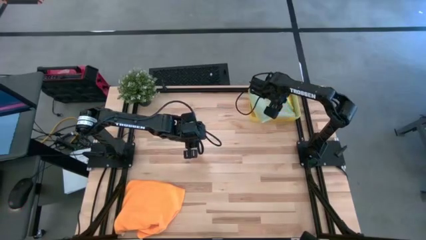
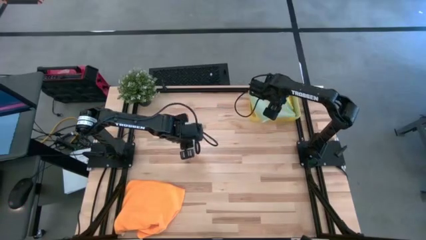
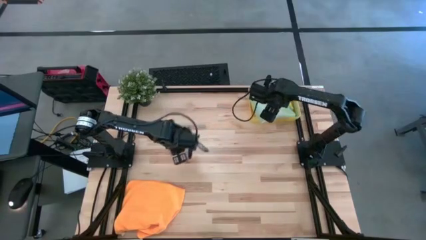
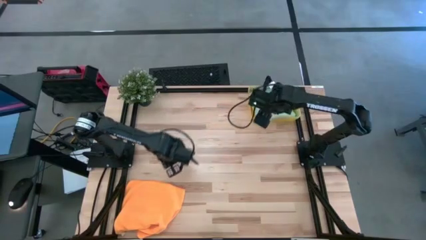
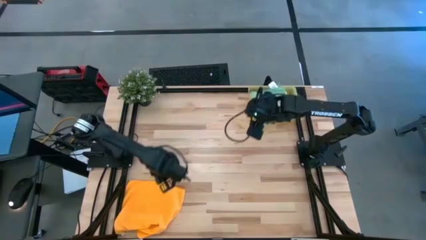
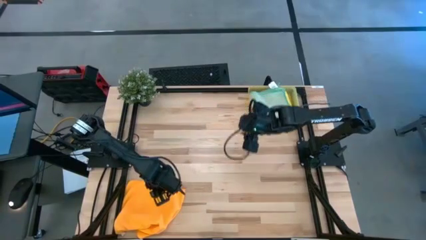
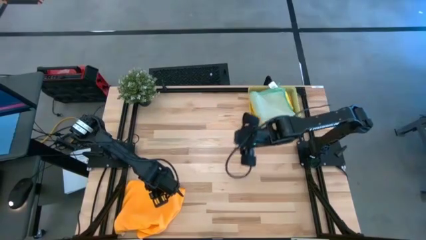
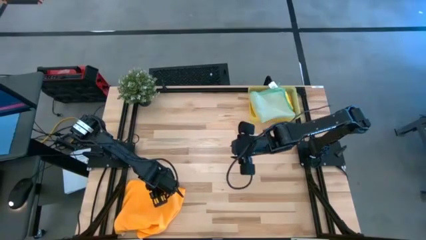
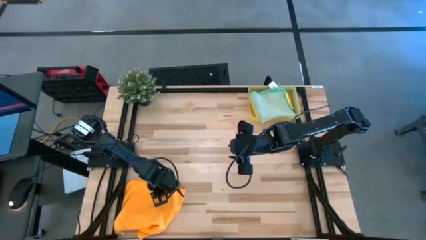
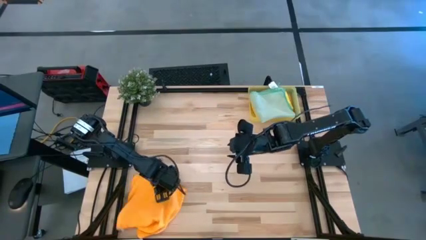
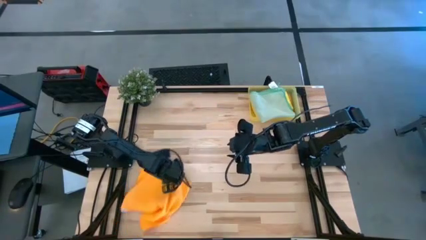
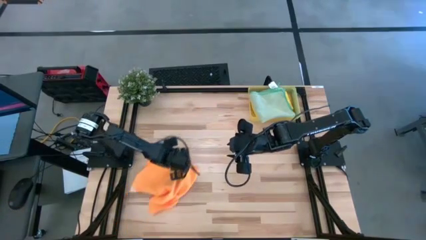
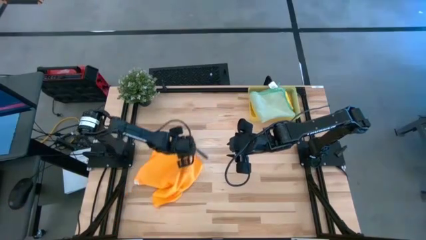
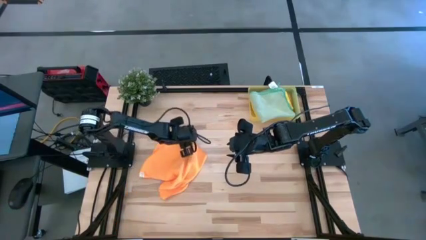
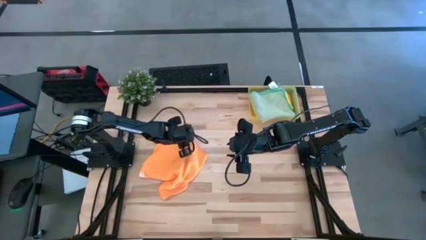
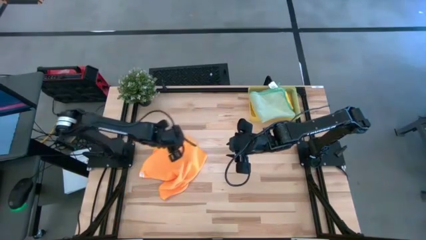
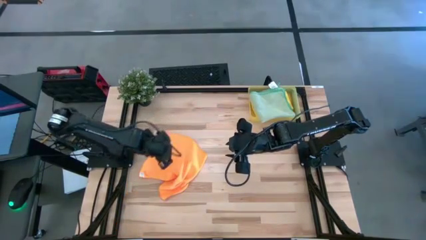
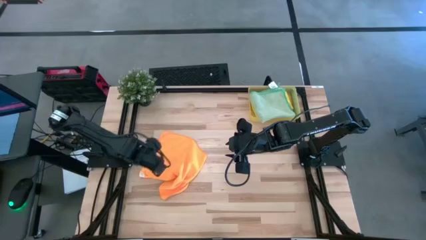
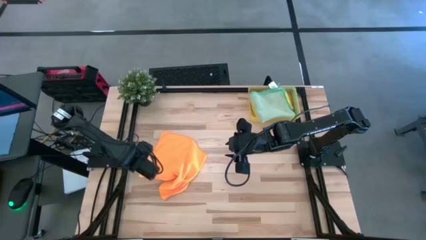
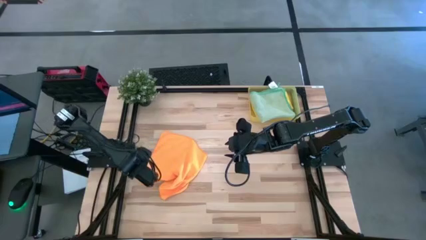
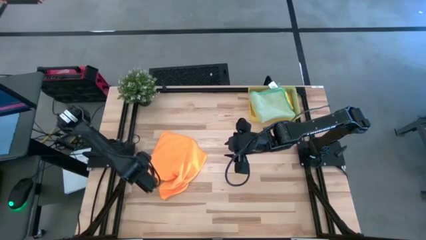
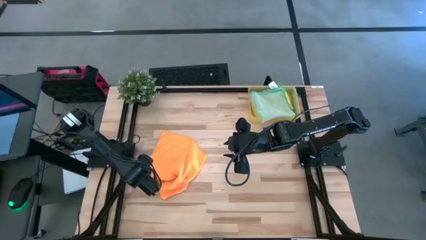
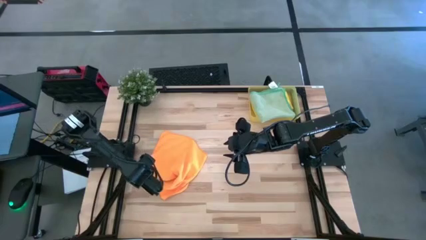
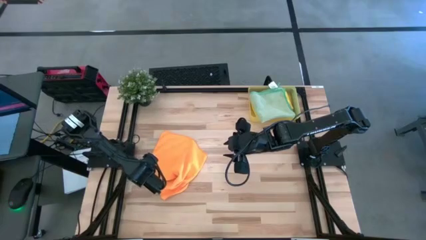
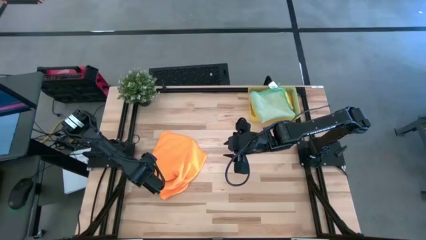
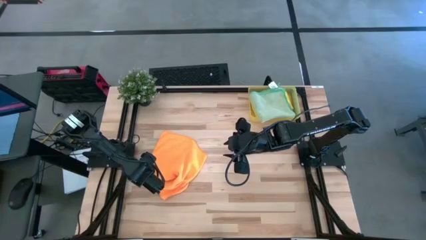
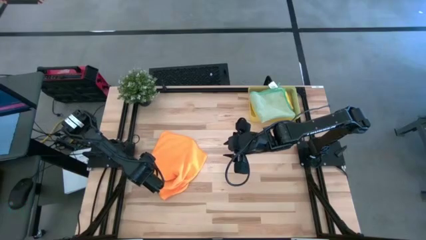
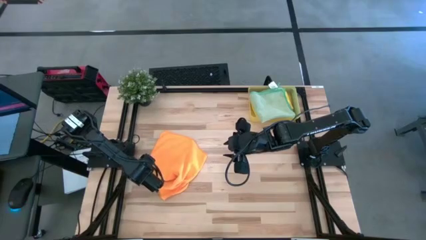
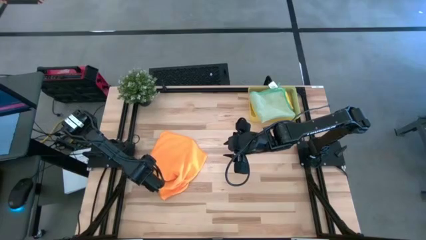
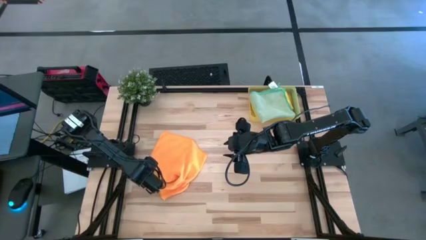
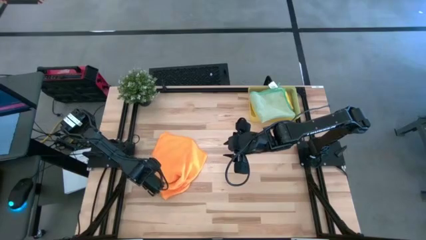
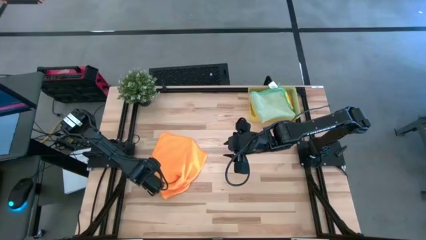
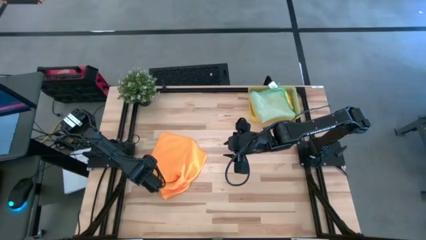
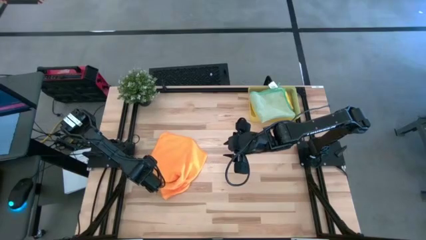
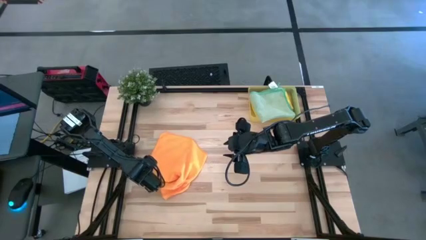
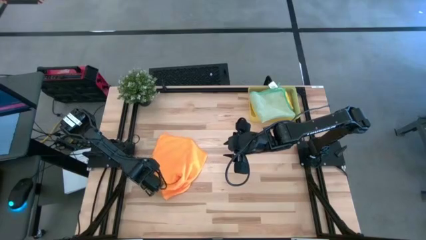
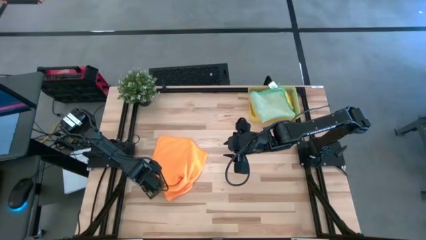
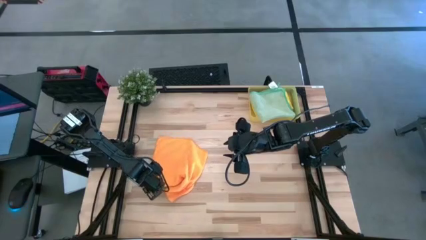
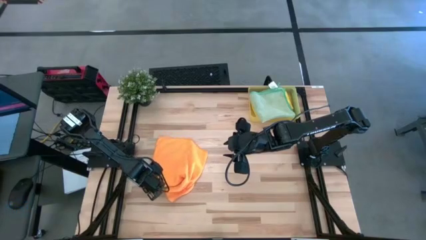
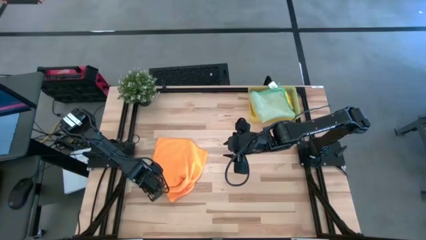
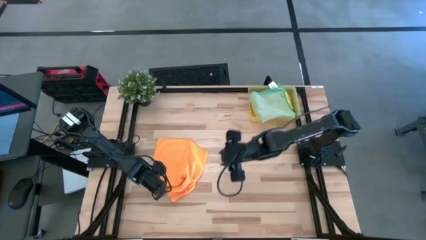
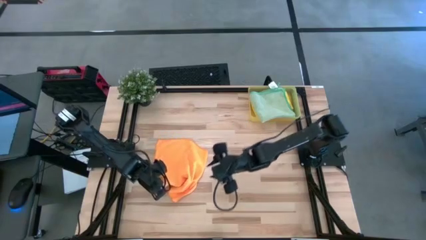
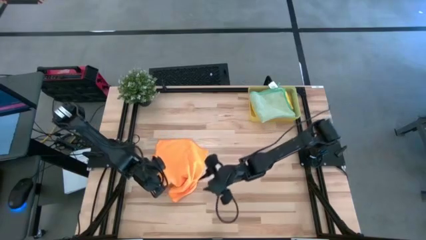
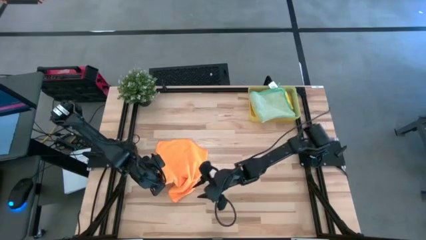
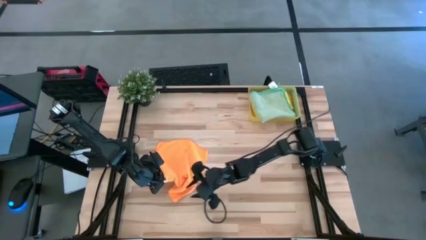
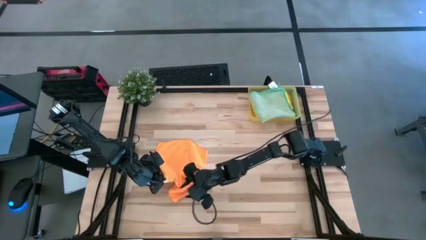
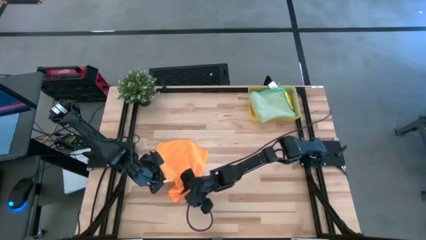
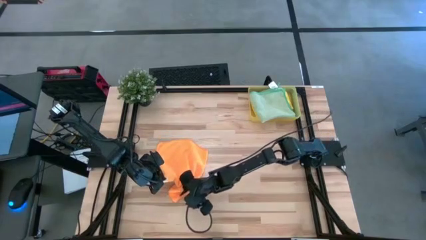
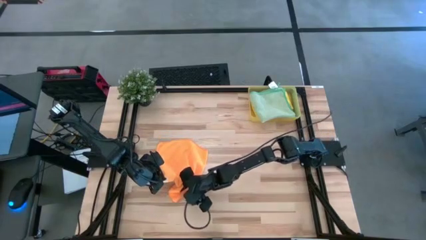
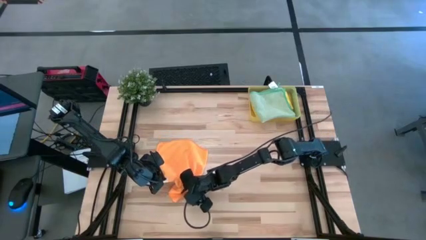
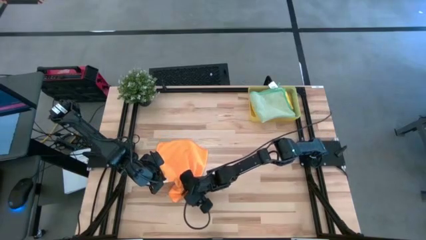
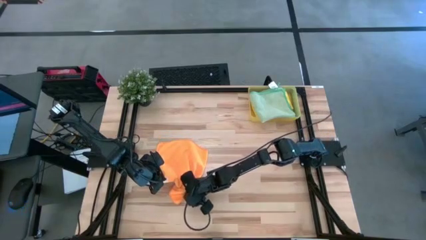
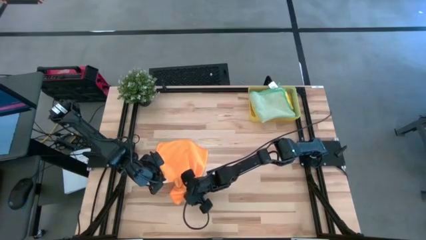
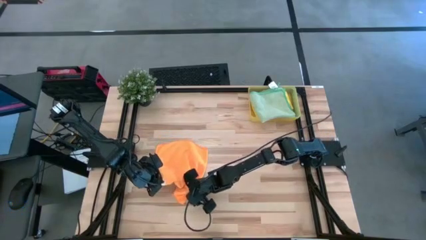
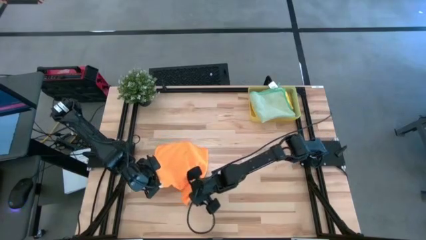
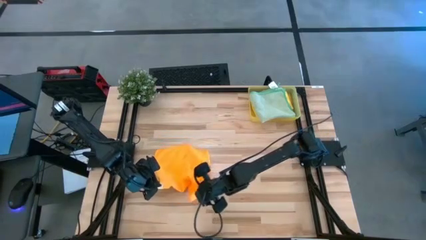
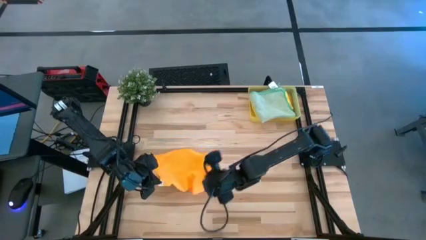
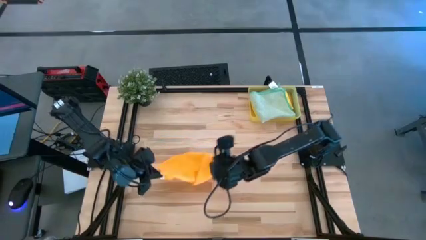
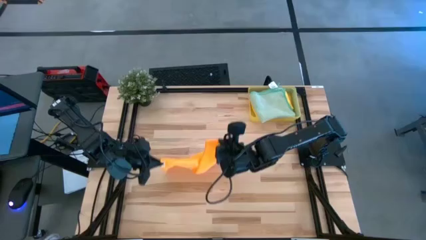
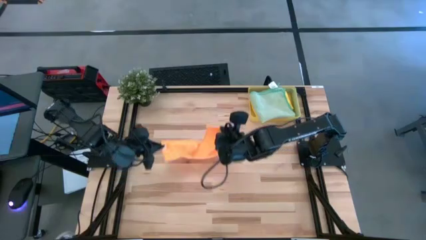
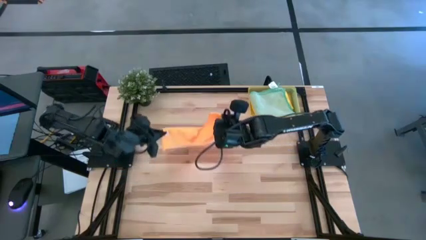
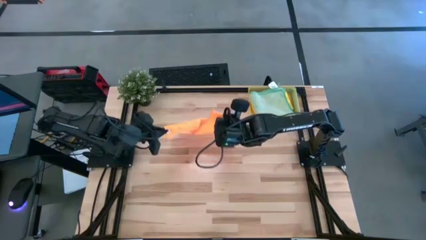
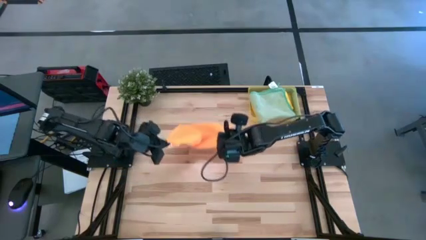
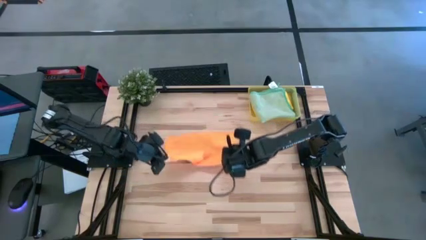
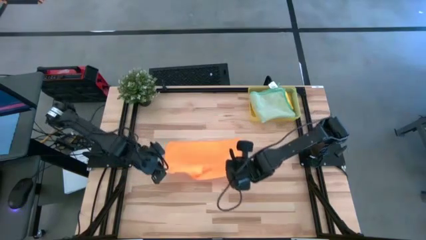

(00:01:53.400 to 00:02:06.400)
Task: Fold microfiber towels
Fold the orange towel

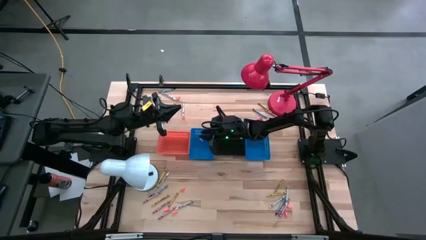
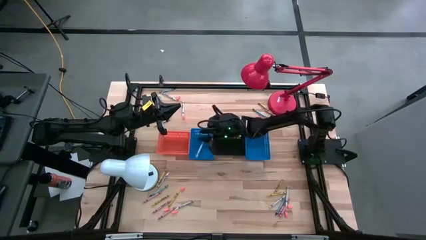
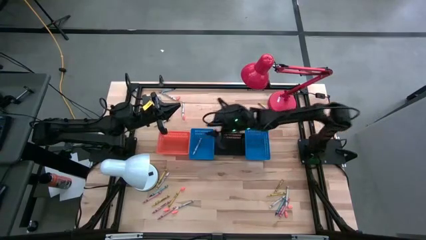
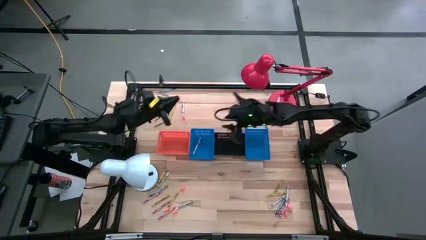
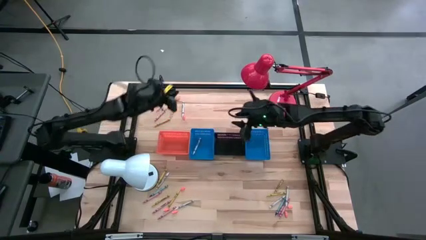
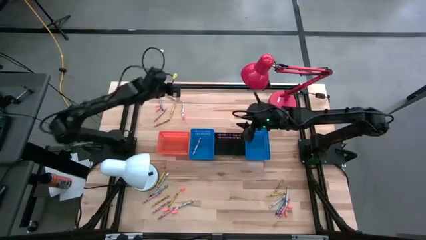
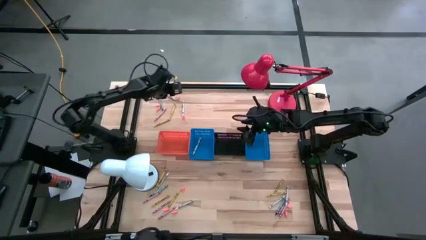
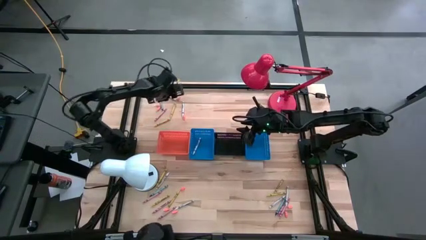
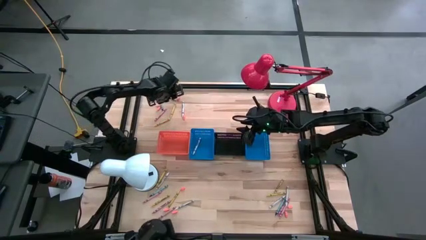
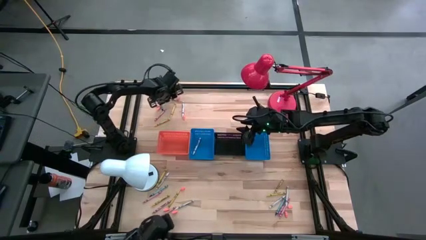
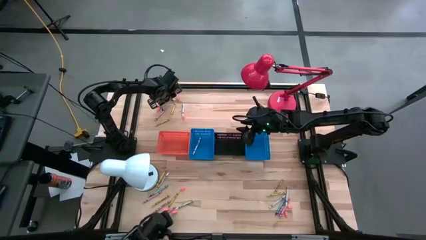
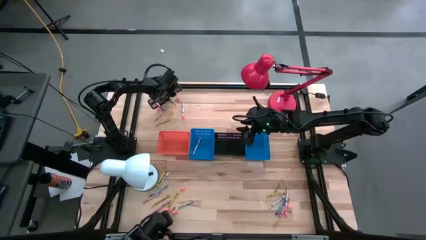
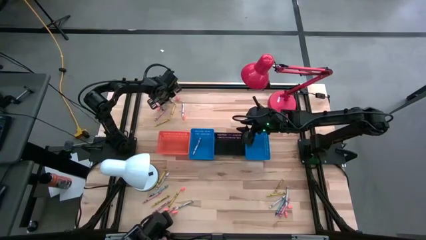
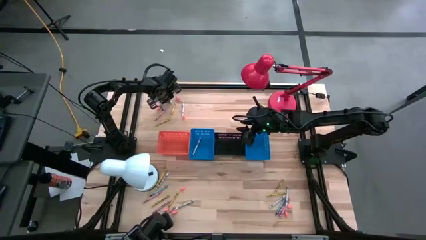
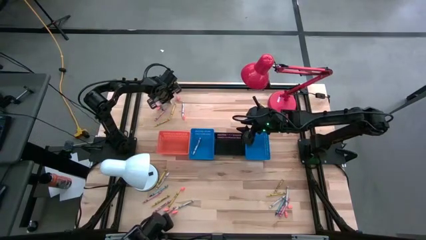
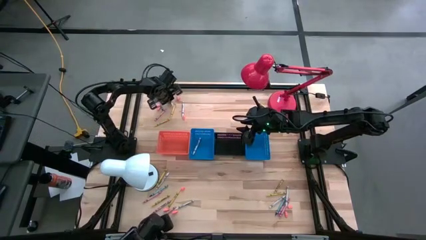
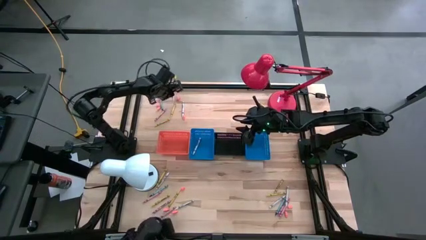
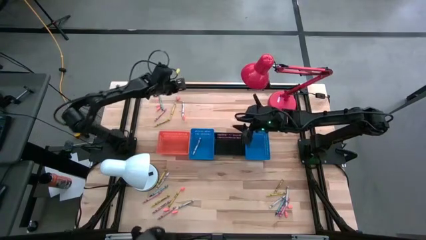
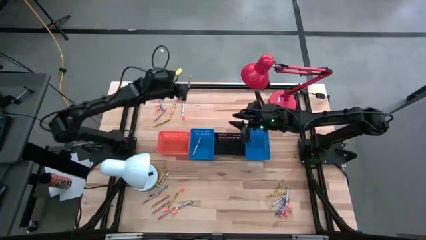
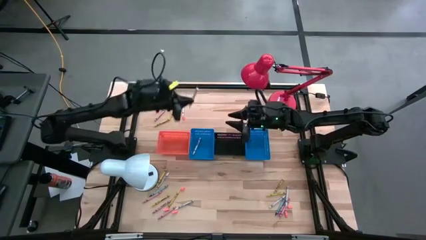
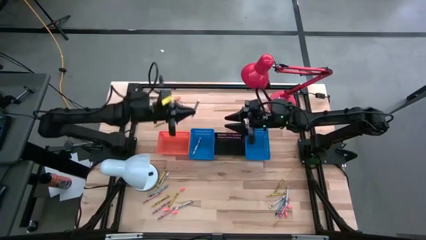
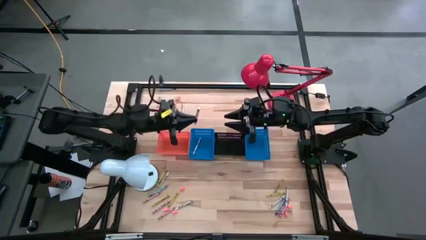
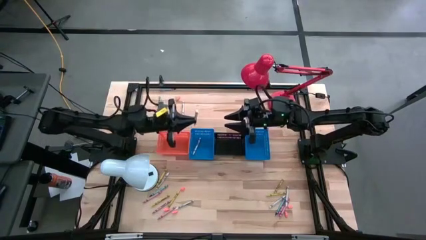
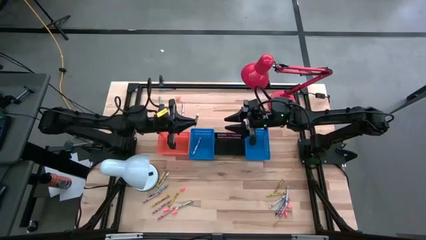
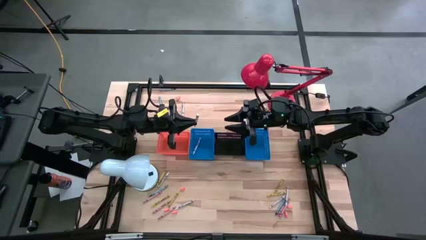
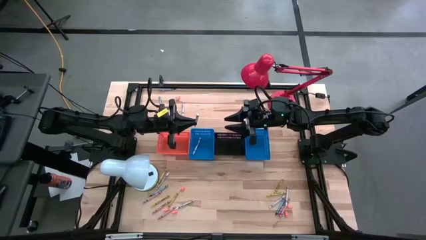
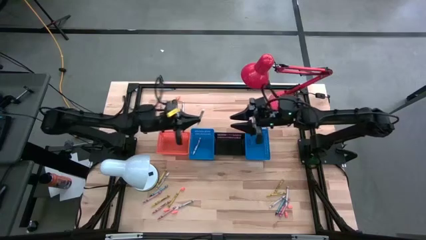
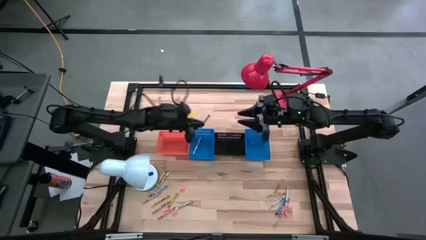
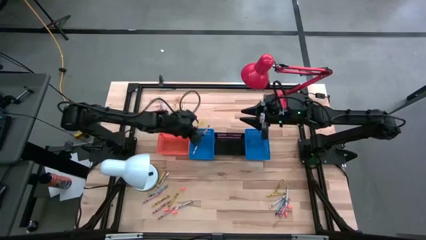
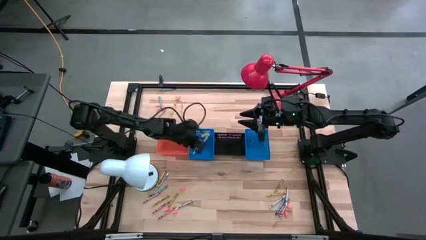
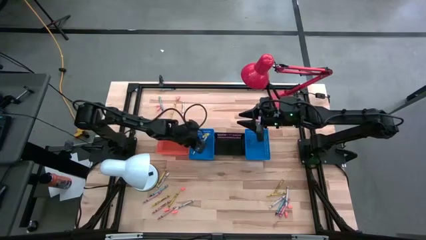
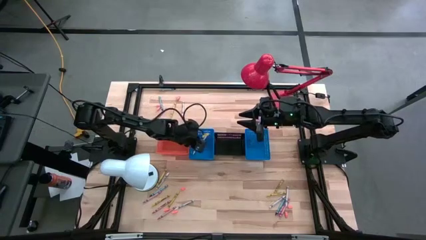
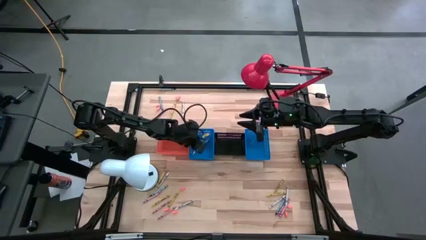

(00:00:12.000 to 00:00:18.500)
Task: Sort crayons
Put the white crayon into the left blue bin
